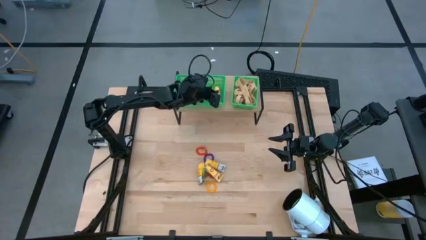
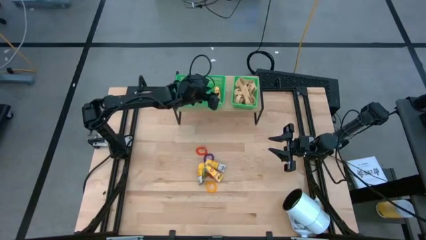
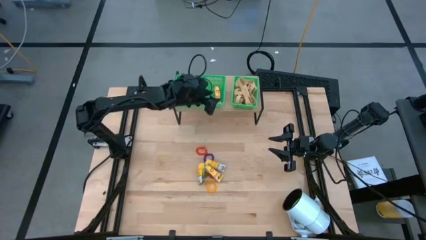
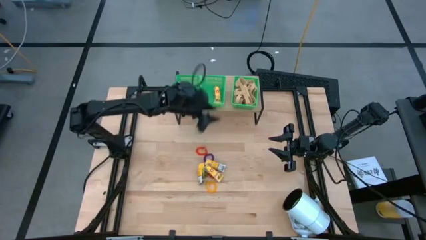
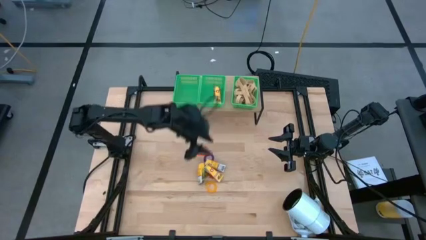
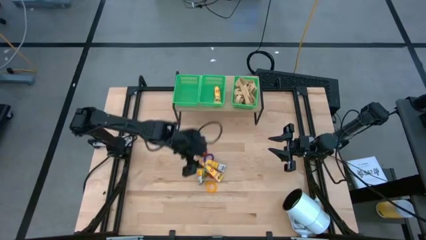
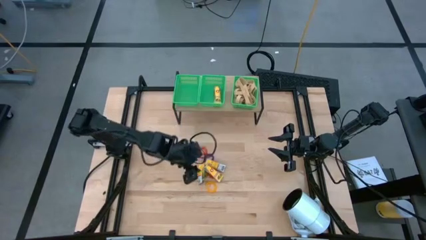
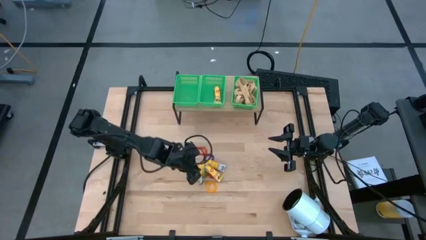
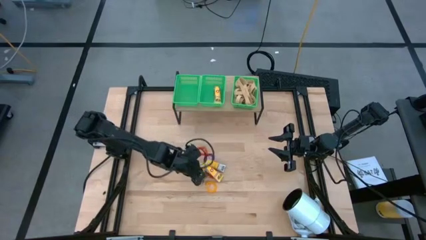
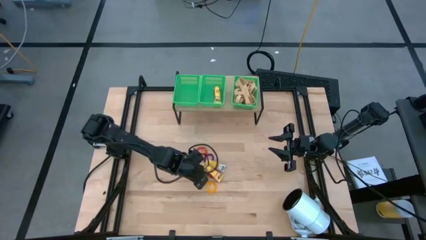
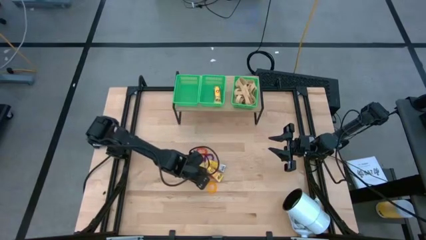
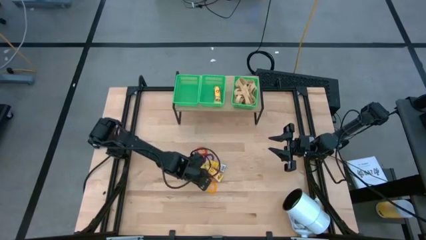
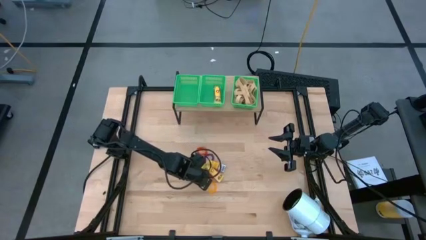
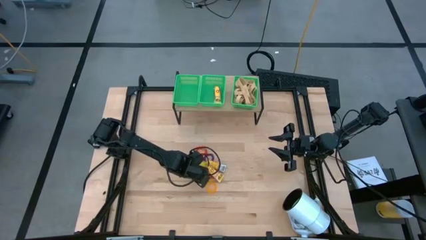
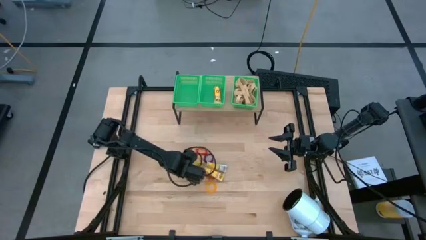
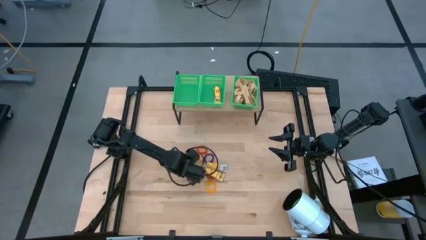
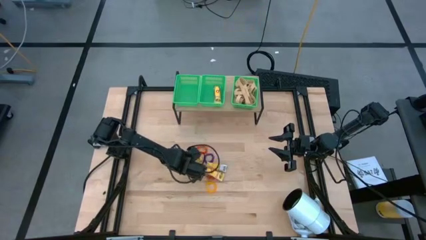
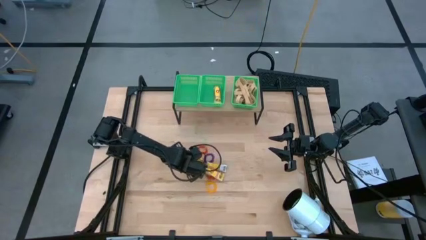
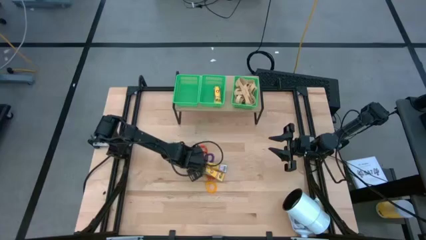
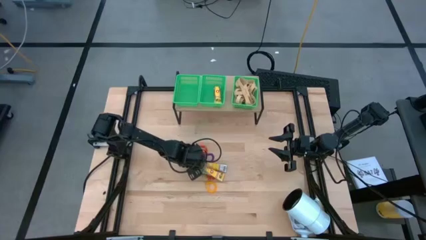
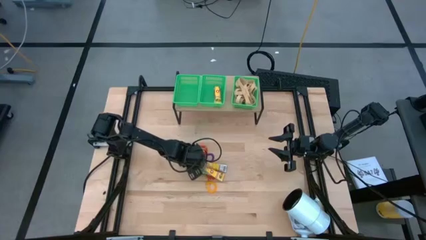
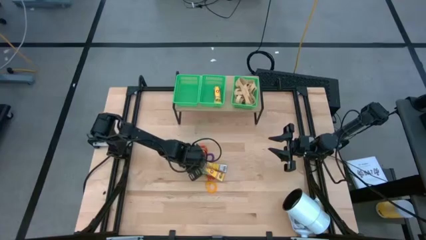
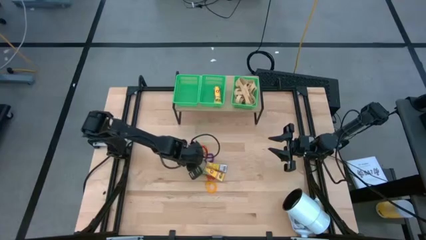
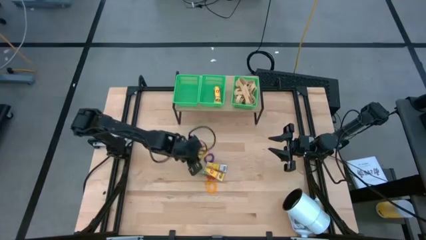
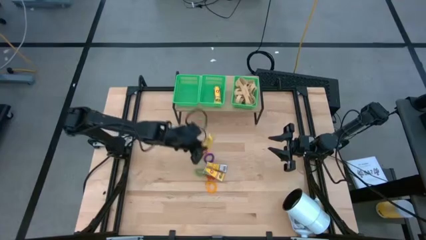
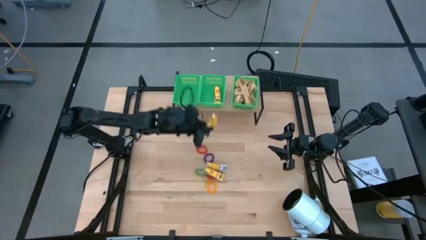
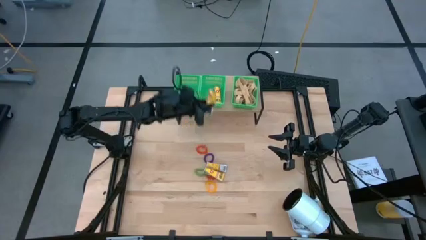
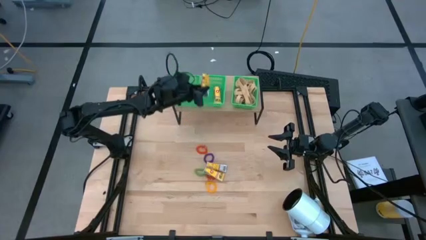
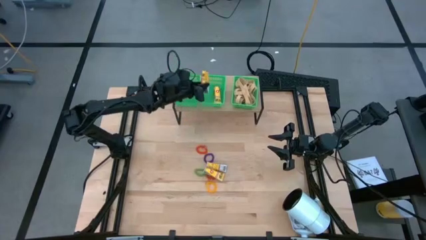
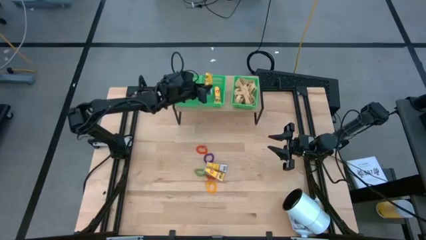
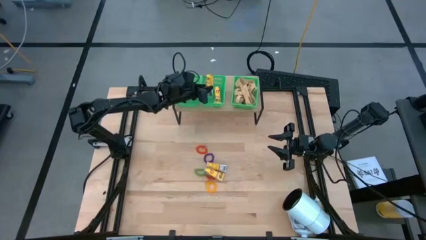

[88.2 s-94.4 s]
Task: Pick & Place Office Desk Supplies
Put the yellow crayon box into the middle green bin on the shelf

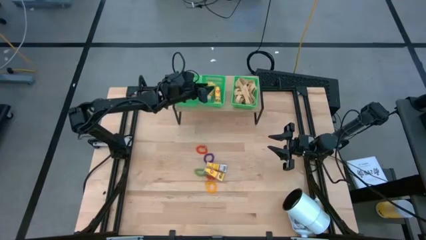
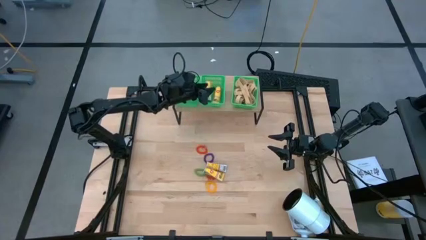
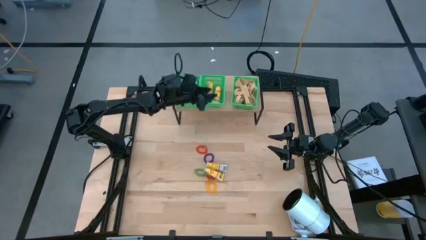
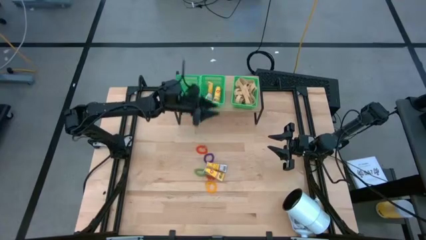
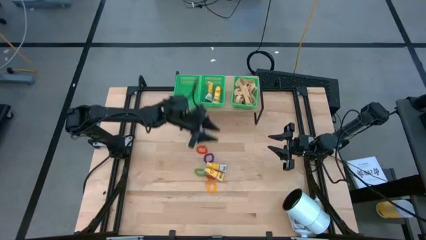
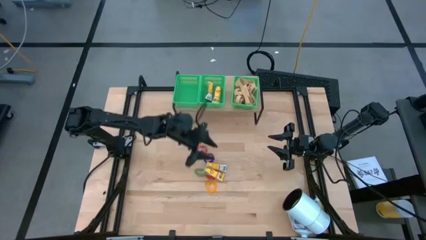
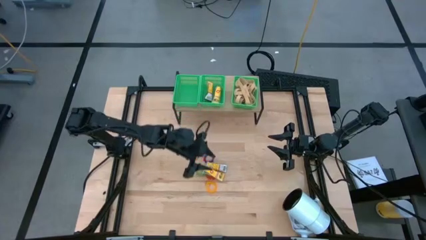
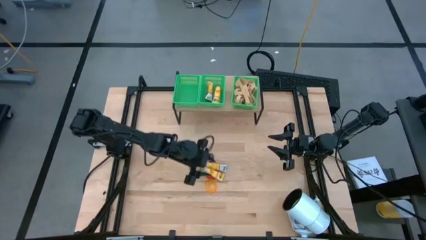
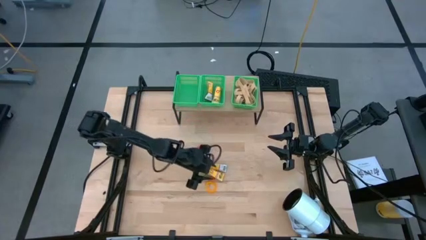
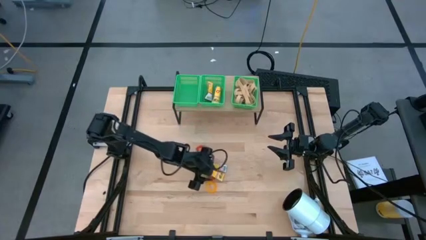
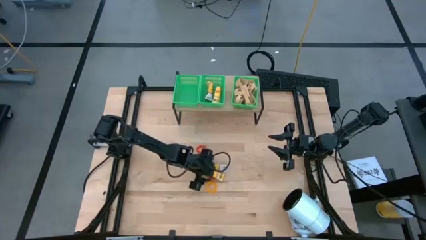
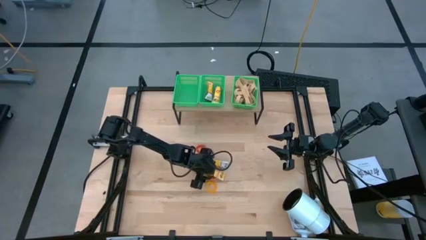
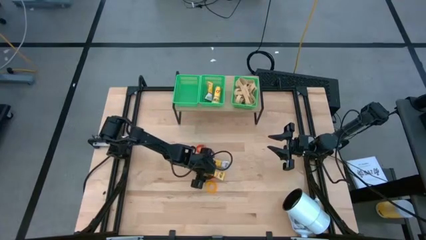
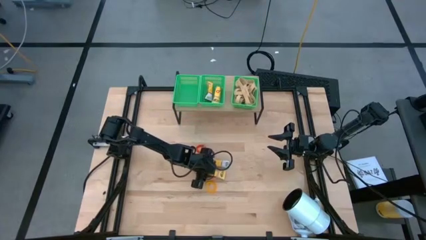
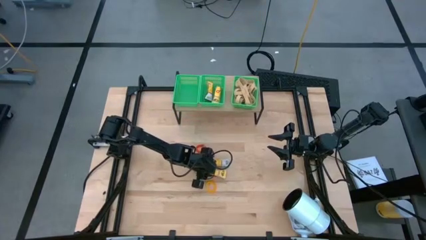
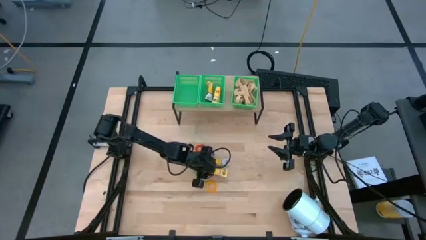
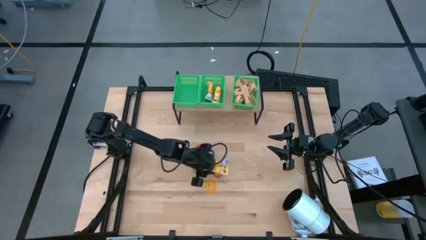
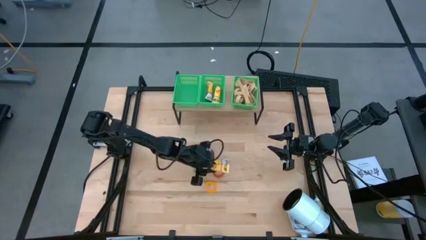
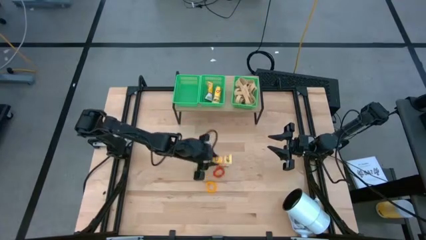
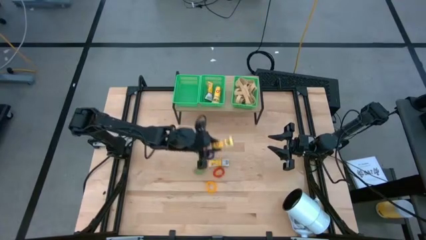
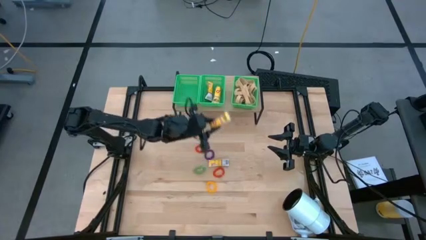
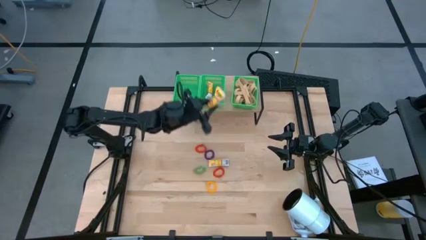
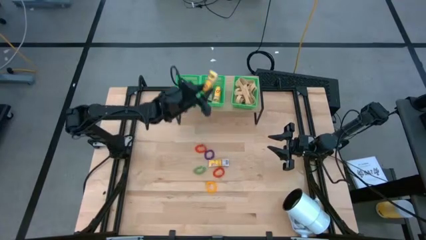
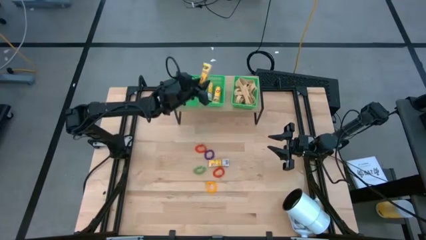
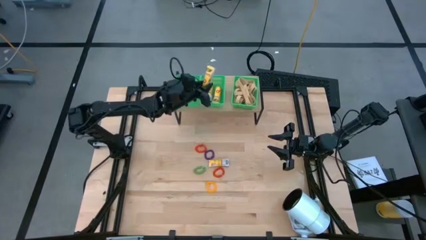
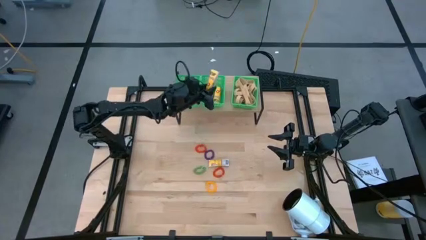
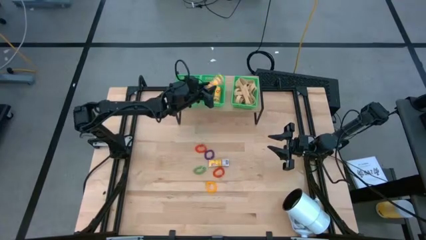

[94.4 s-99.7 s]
Put the yellow crayon box into the middle green bin on the shelf

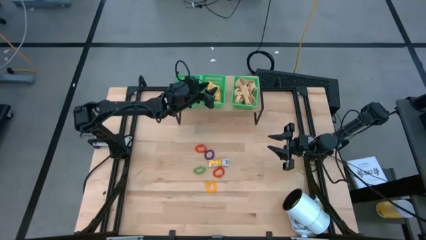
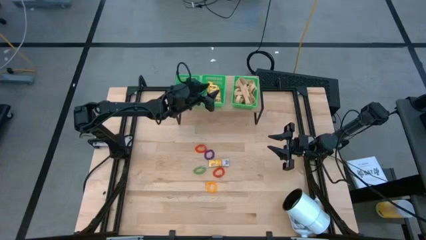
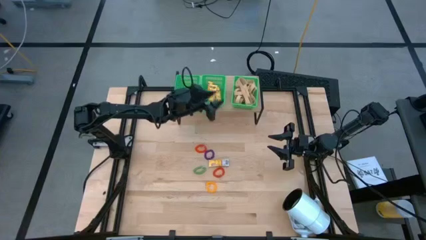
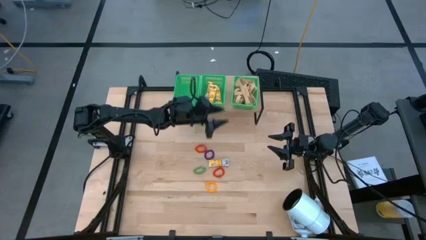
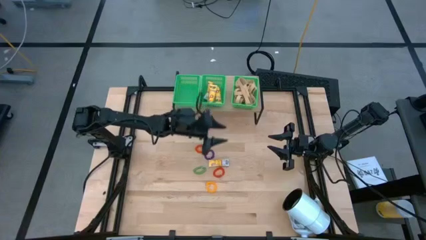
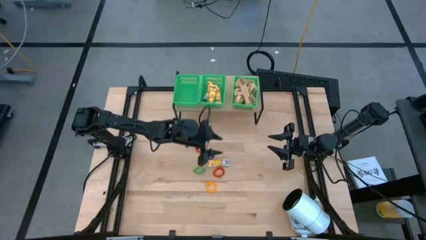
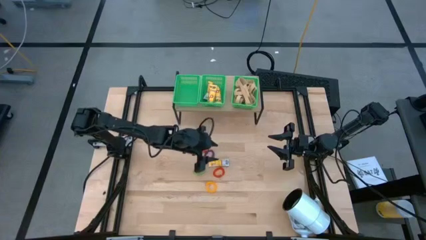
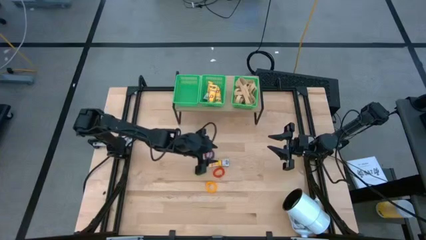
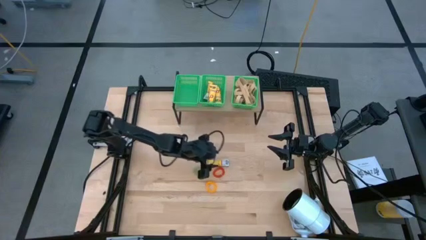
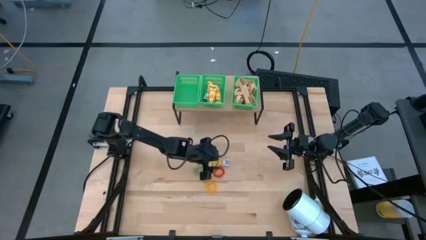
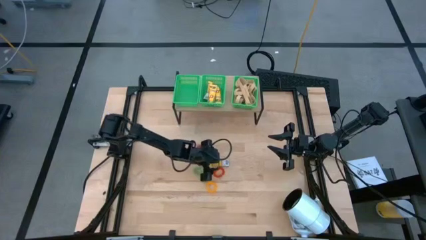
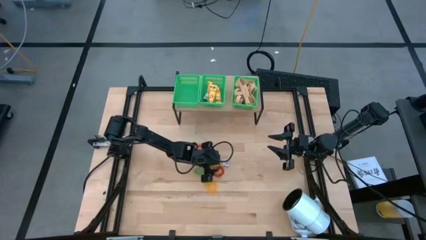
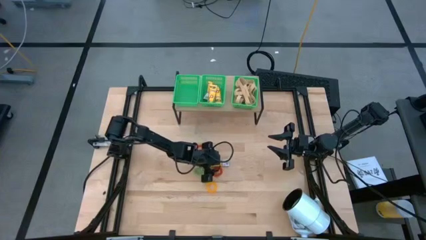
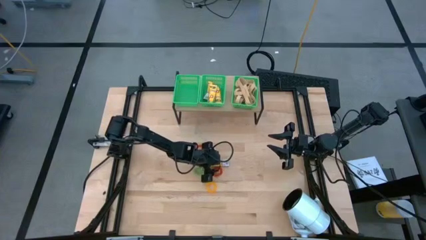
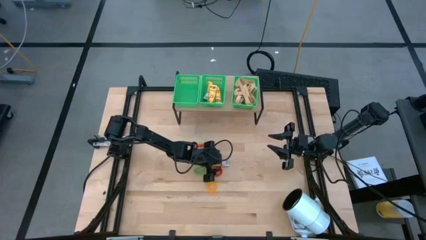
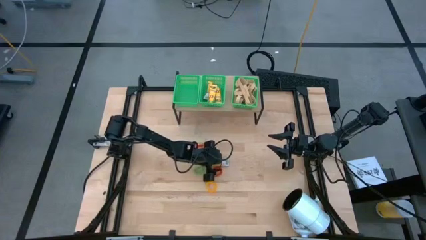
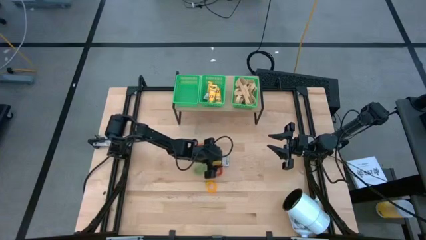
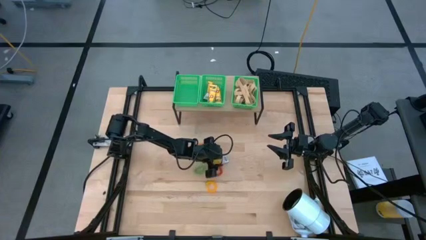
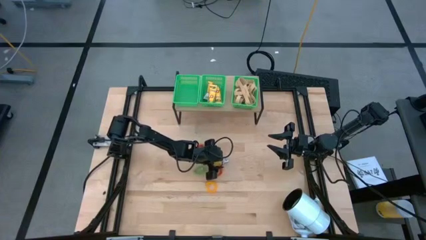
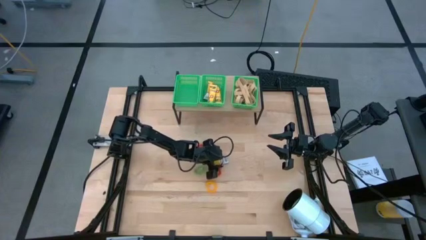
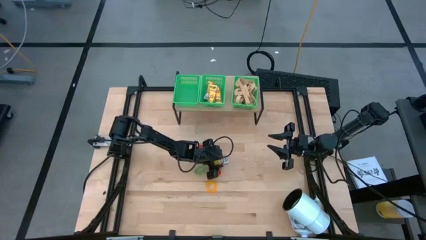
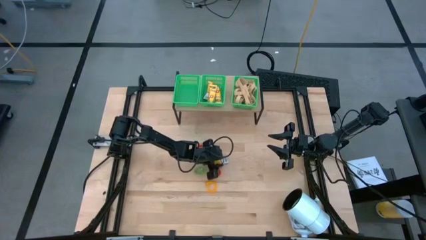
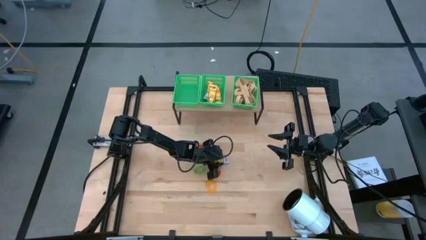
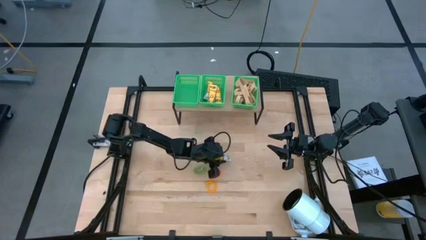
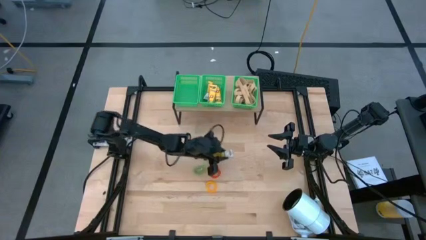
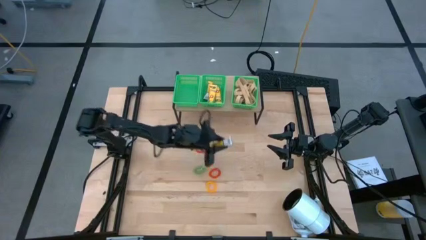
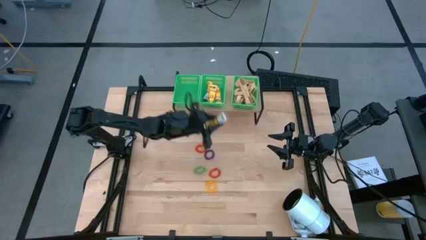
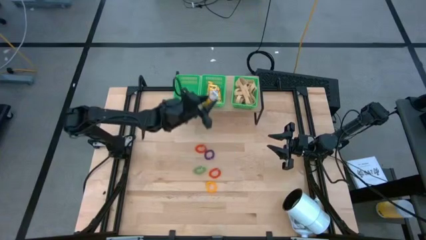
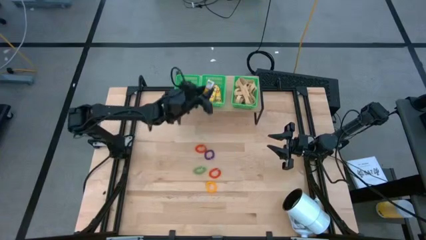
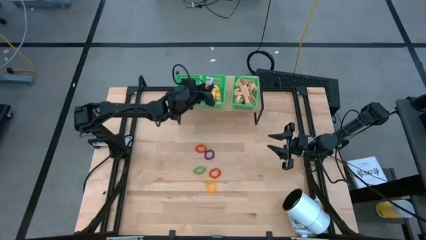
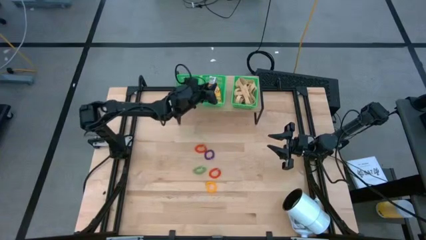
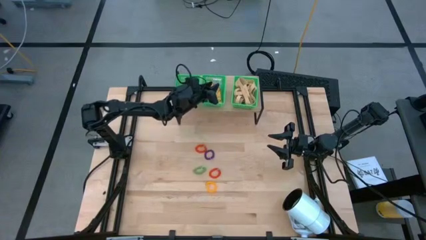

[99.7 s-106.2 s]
Put the yellow crayon box into the middle green bin on the shelf
